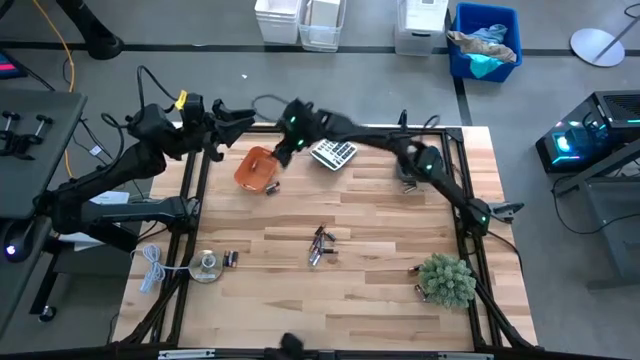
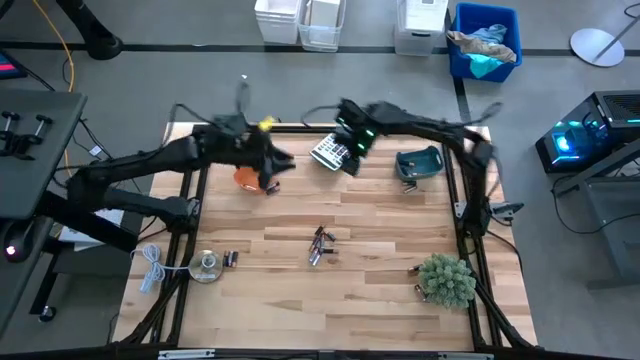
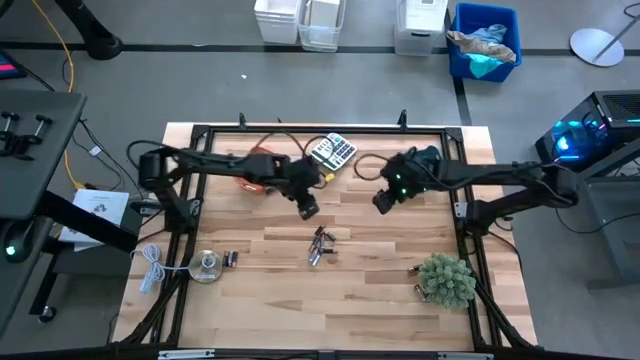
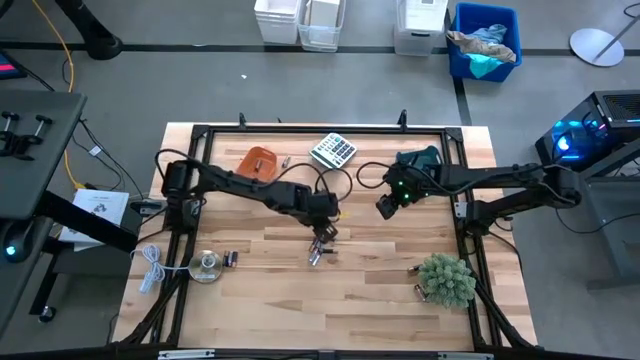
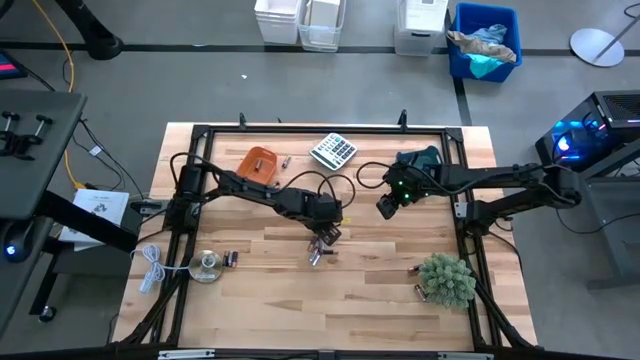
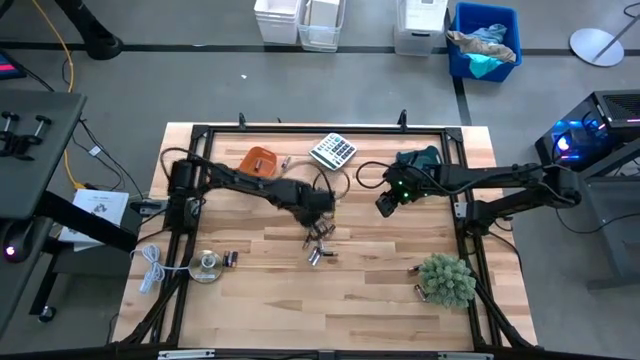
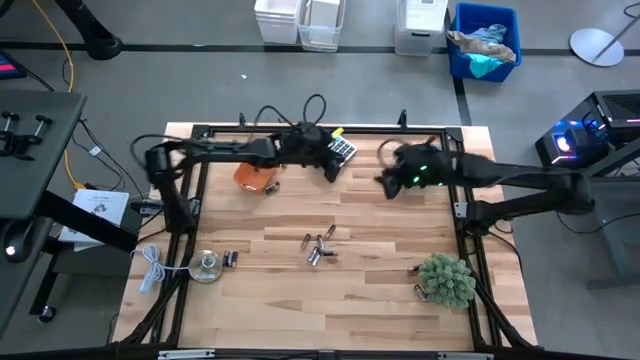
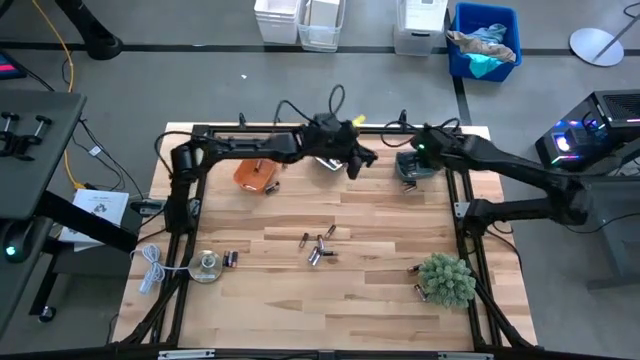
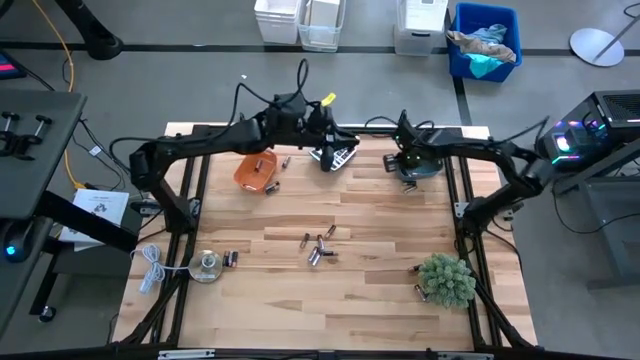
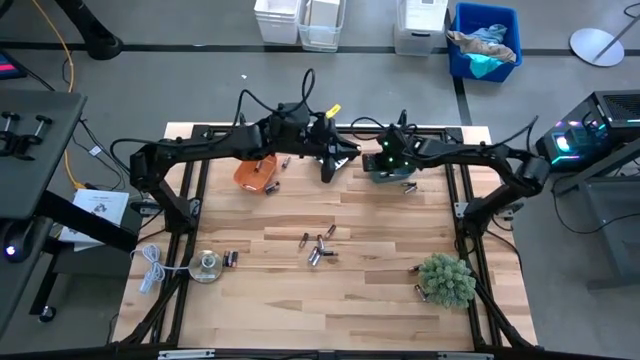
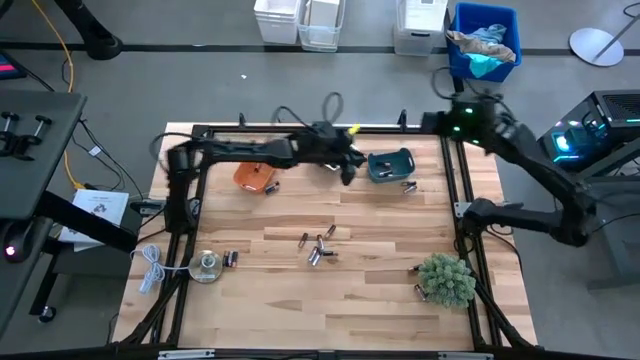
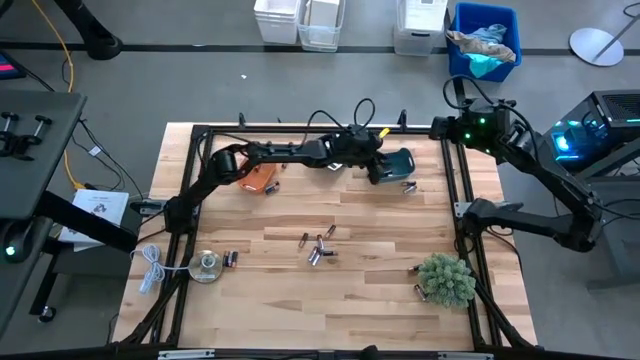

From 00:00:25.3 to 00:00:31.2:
Task: Sort batteries
Put the golden battery into the blue bin

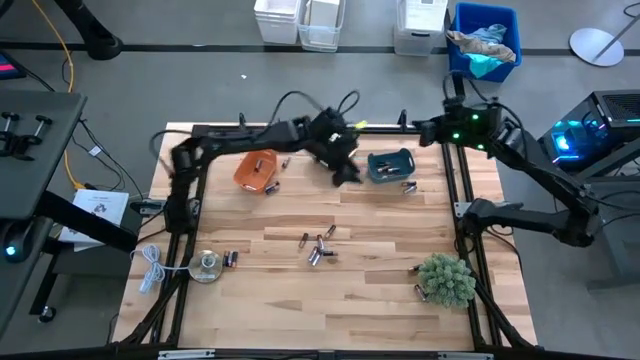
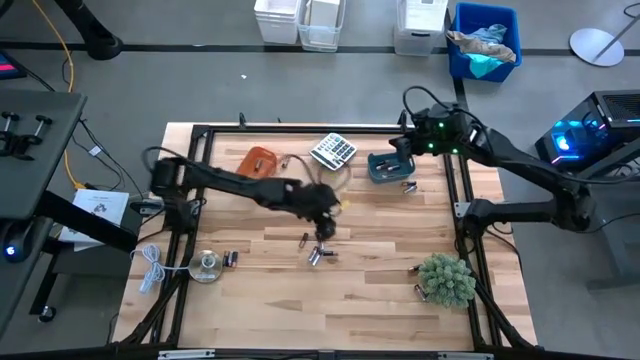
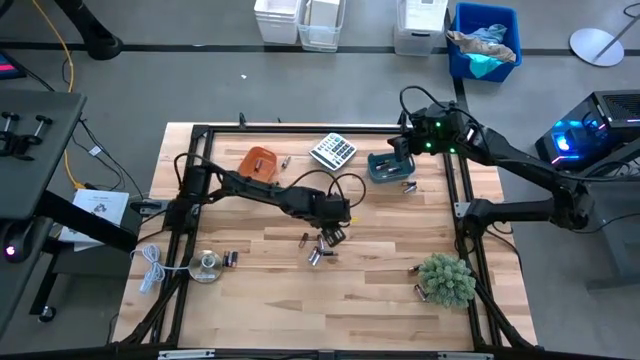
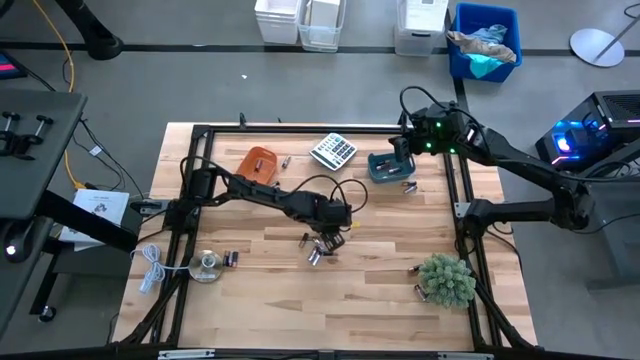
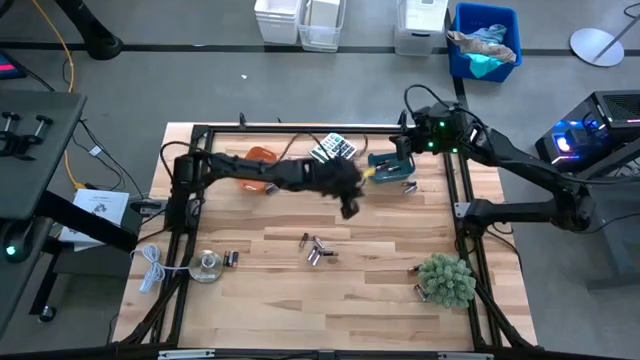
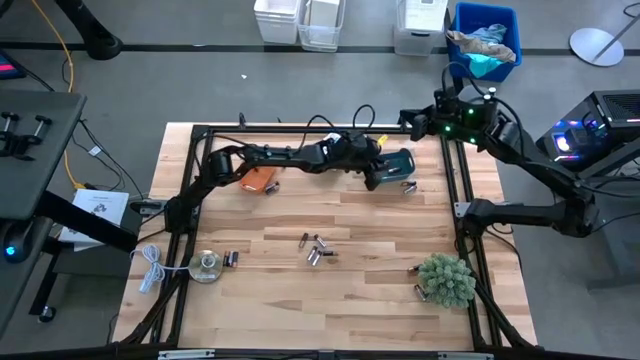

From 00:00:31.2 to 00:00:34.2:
Put the golden battery into the blue bin

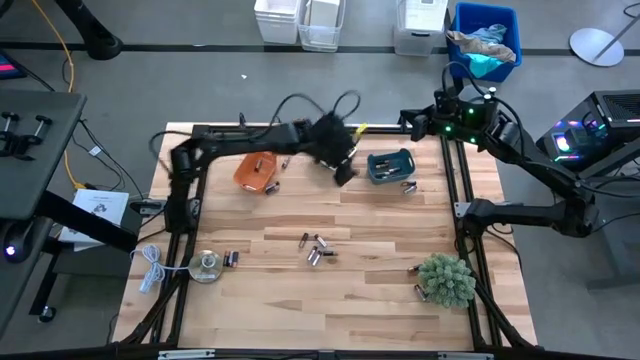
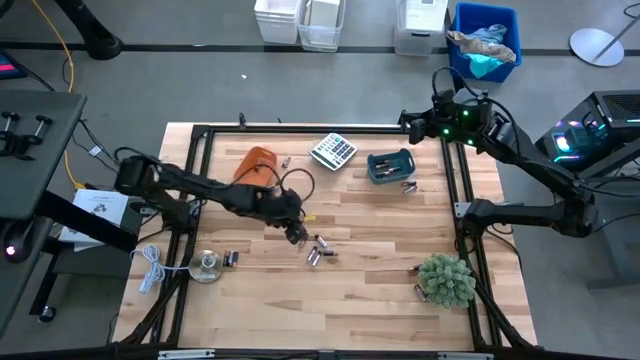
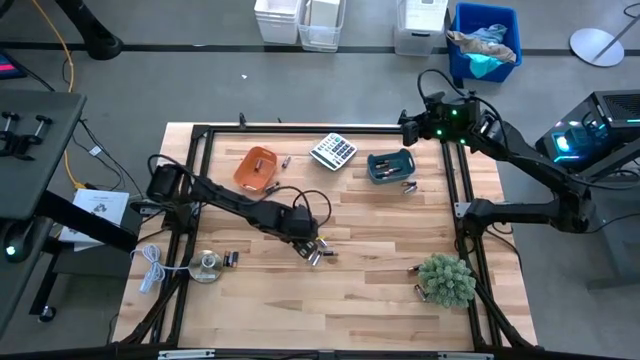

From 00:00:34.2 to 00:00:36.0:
Put the golden battery into the blue bin

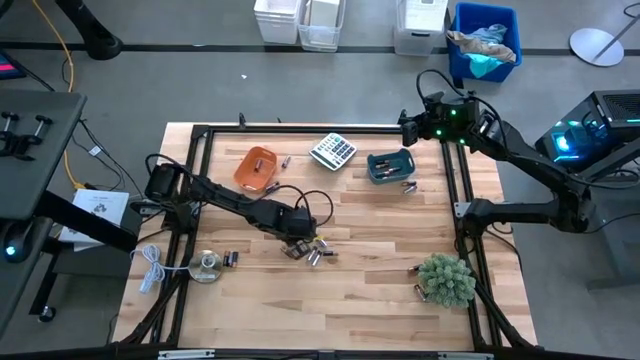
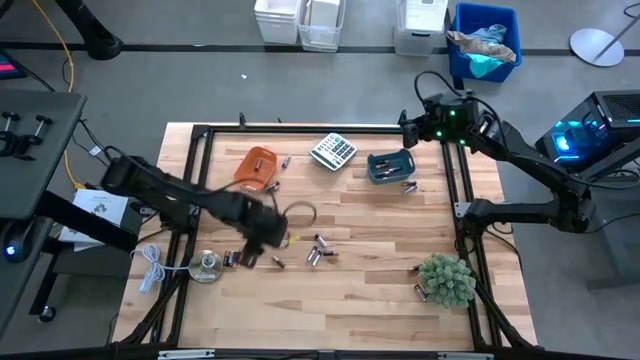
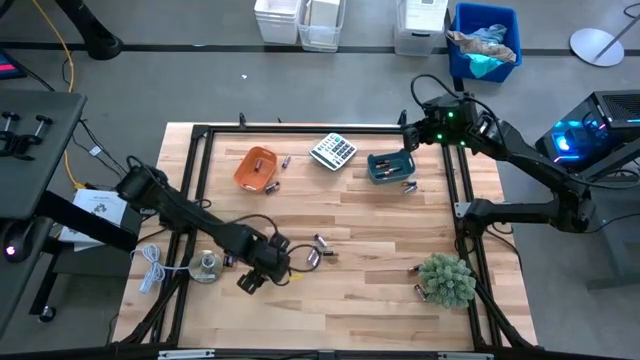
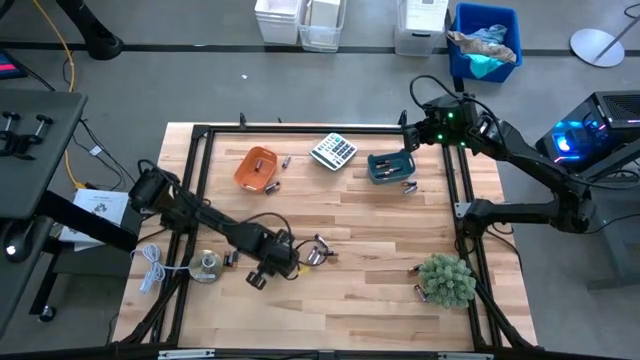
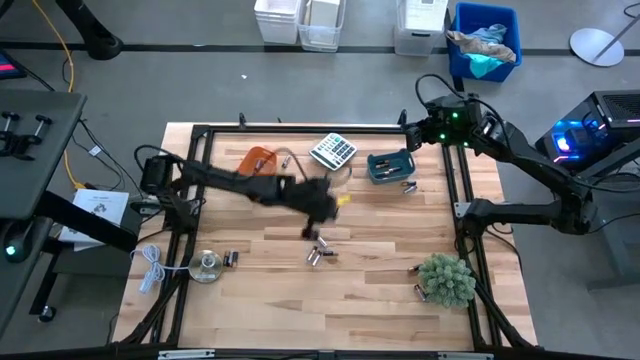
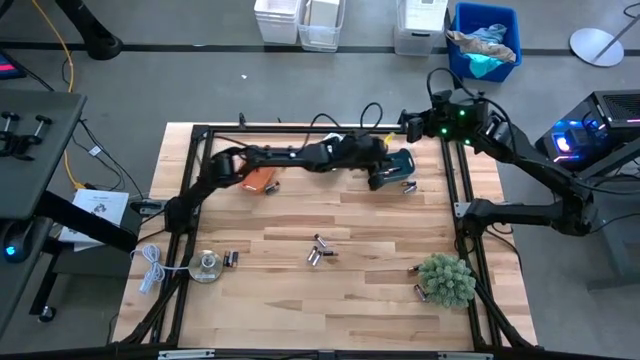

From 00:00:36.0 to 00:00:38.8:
Put the golden battery into the blue bin

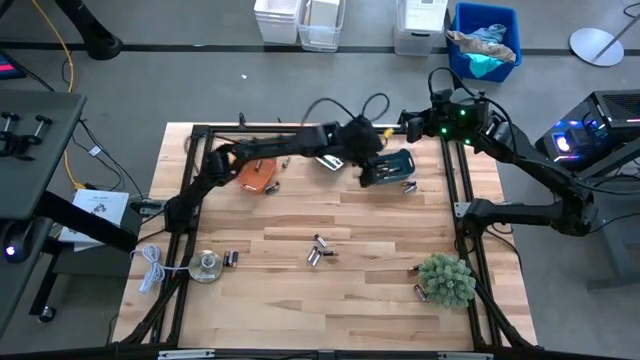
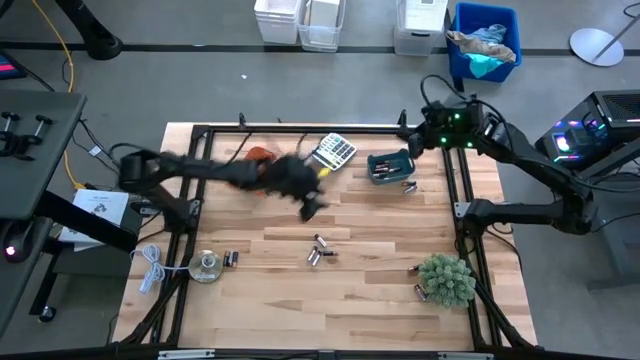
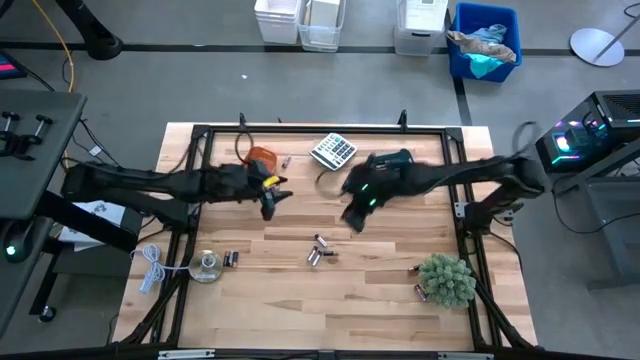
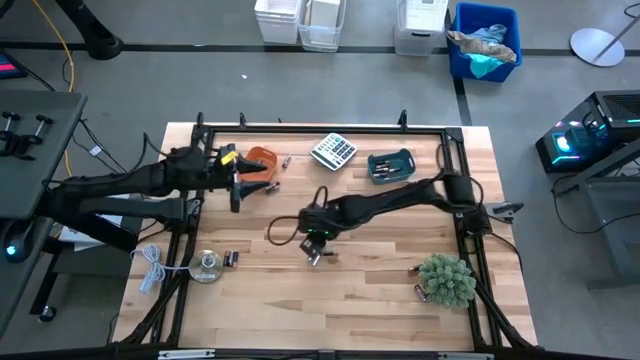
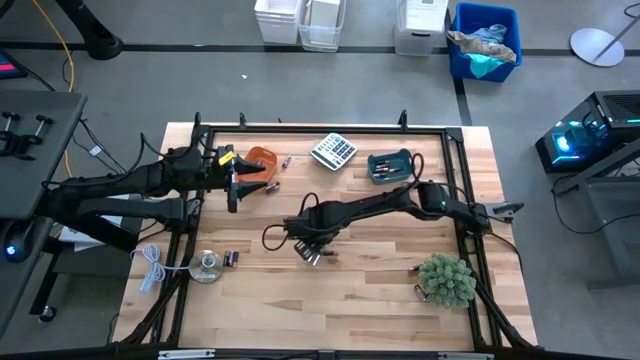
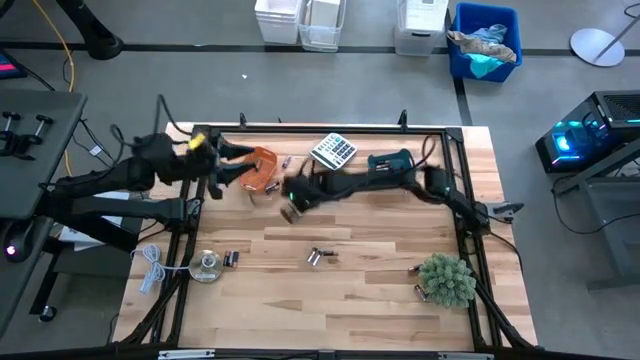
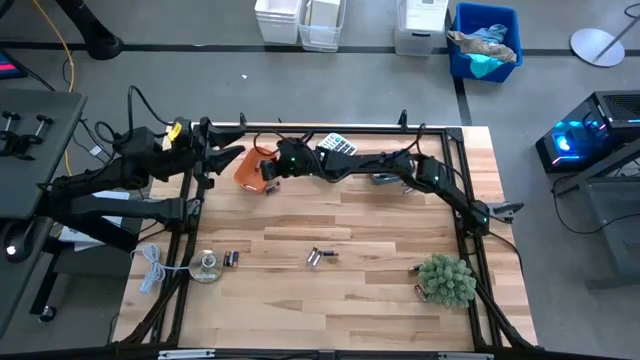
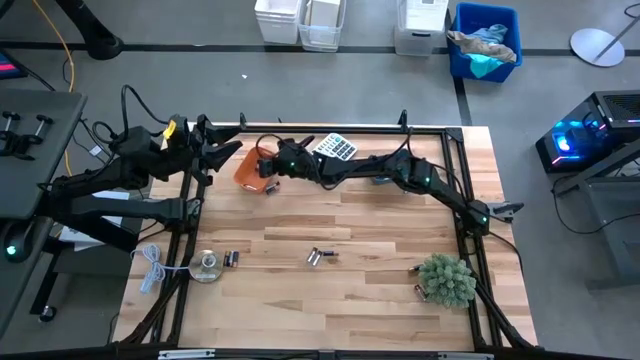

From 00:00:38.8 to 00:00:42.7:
Put the silver battery into the orange bin

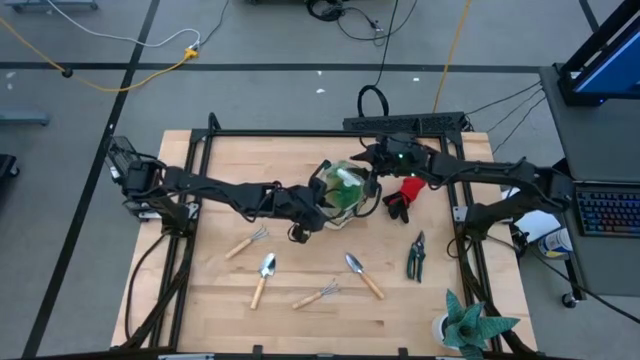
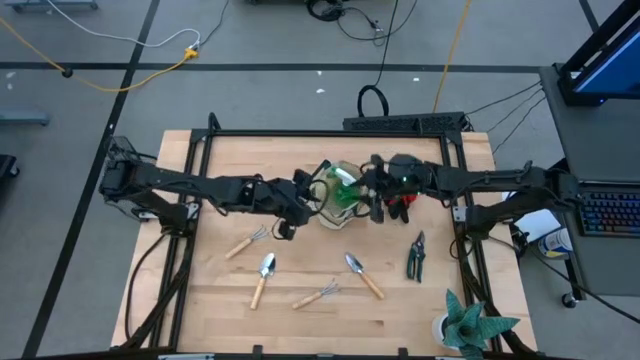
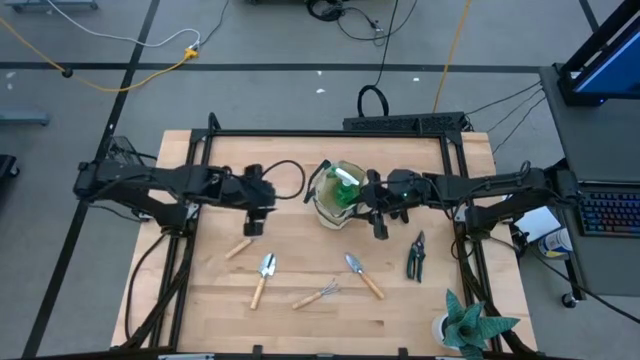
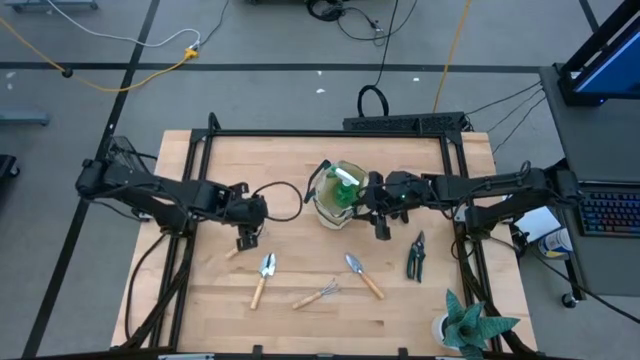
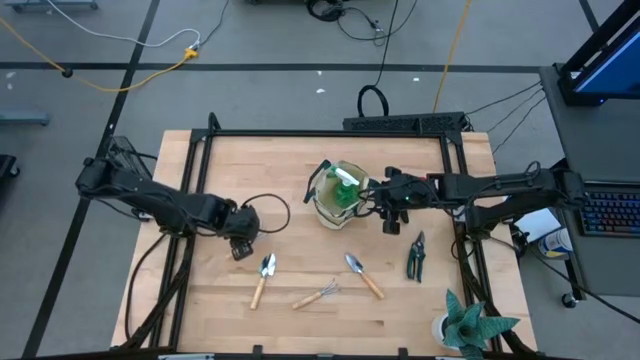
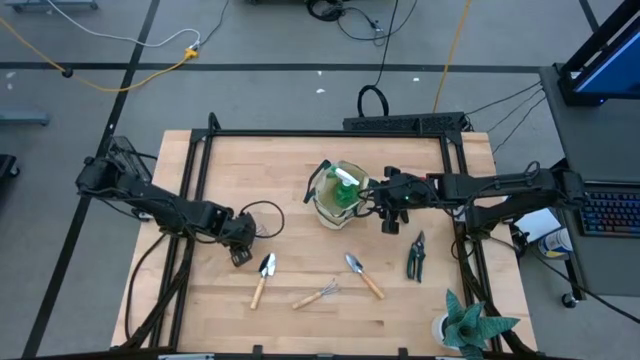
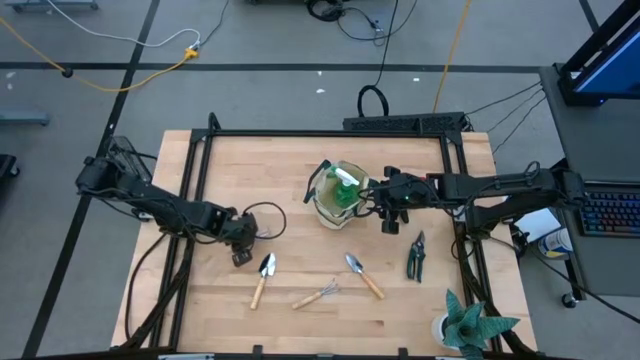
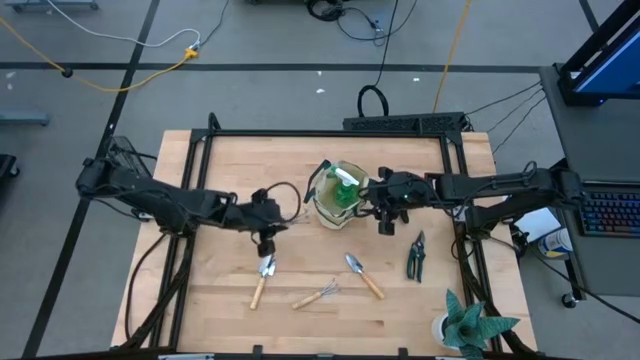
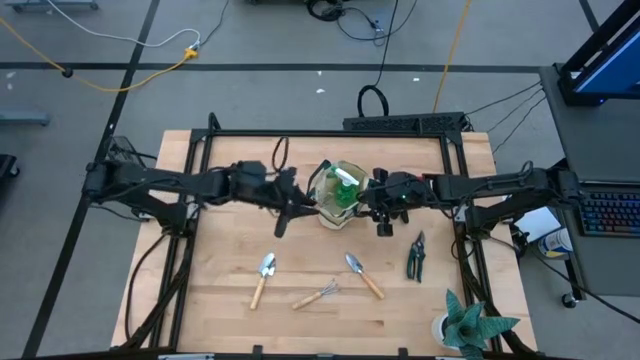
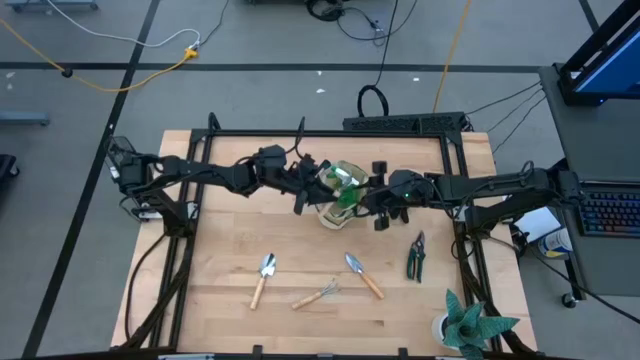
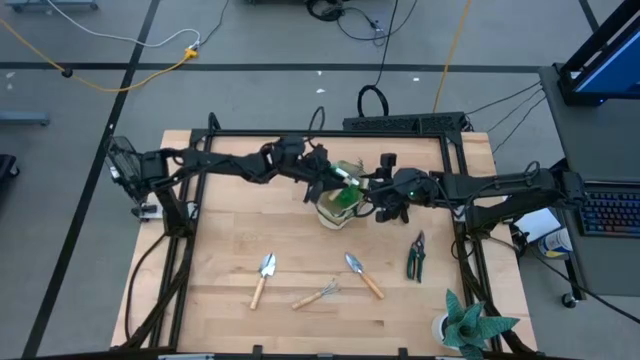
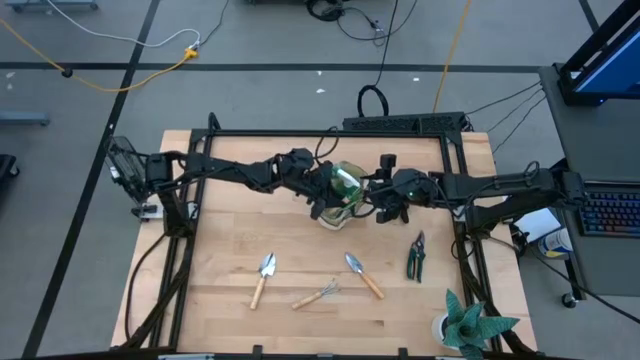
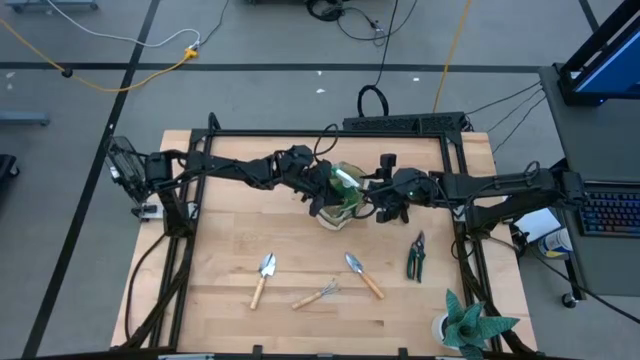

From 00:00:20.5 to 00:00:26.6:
Task: Pick & Place Garden tools in Gardening bag
Put the top brown hand rake into the brown gardening bag
